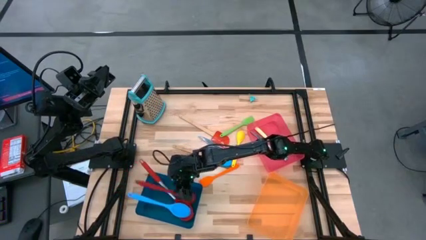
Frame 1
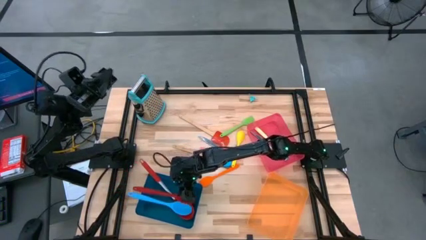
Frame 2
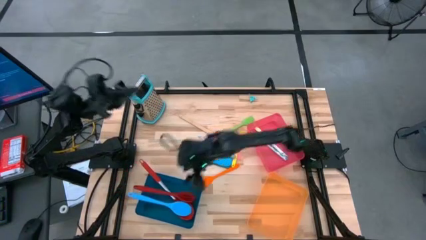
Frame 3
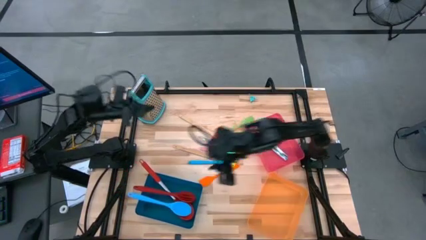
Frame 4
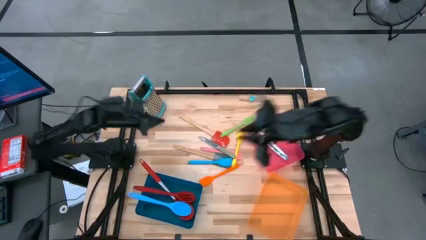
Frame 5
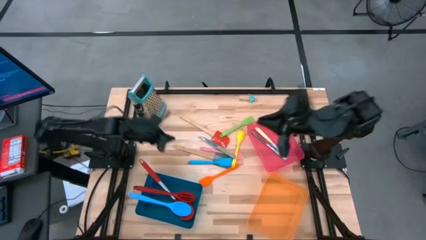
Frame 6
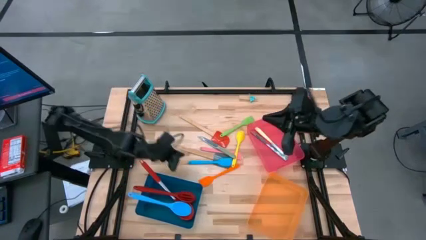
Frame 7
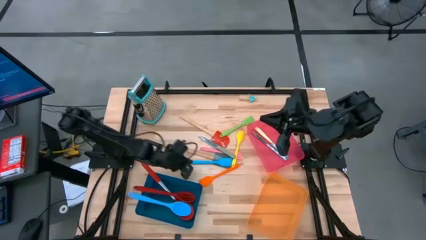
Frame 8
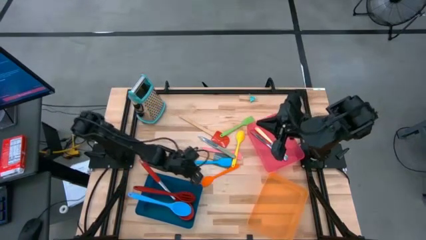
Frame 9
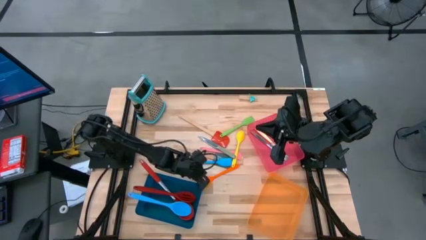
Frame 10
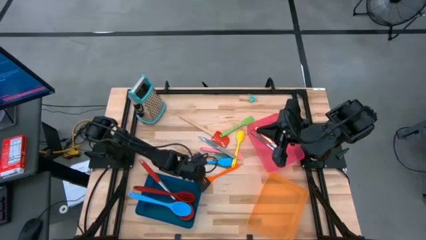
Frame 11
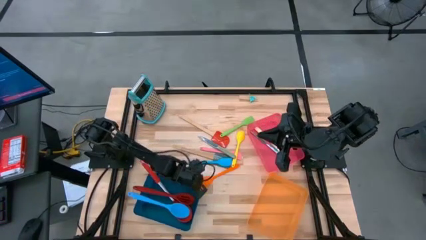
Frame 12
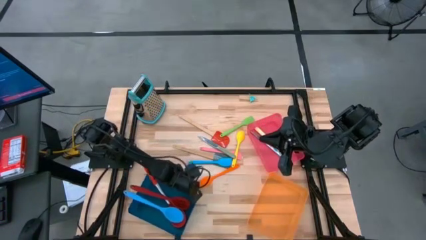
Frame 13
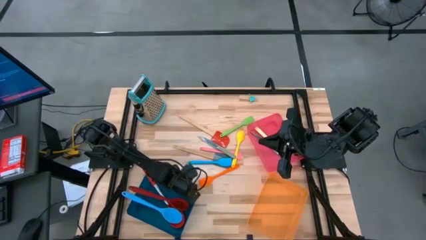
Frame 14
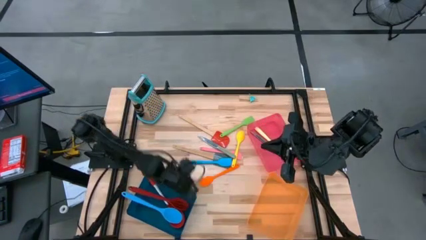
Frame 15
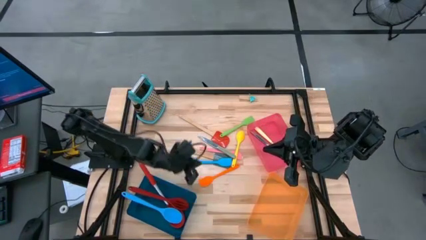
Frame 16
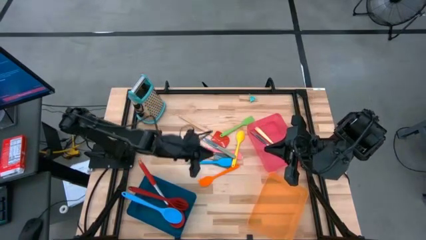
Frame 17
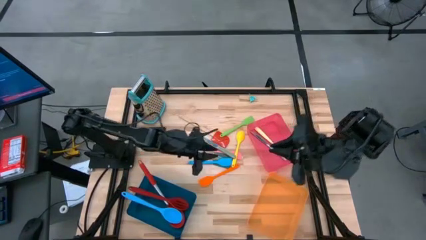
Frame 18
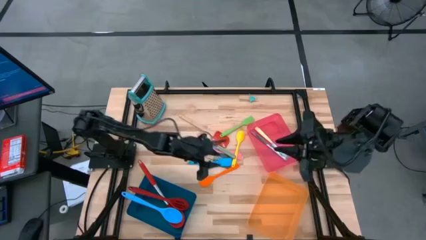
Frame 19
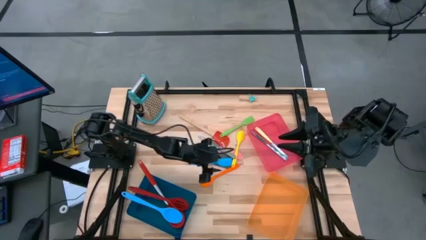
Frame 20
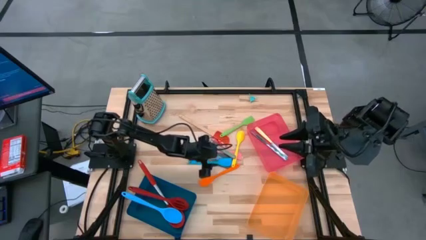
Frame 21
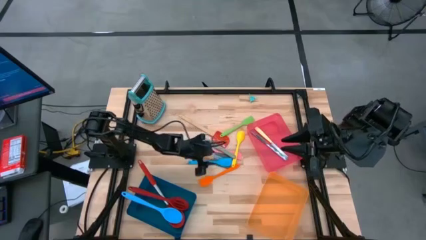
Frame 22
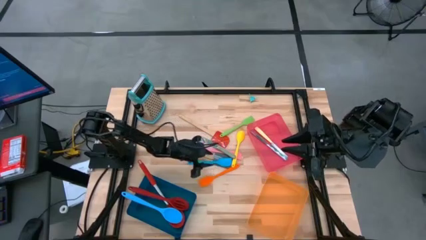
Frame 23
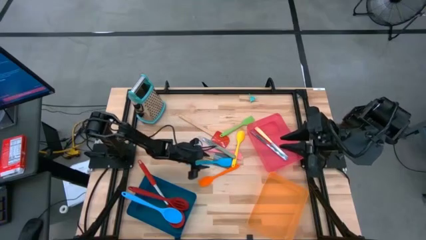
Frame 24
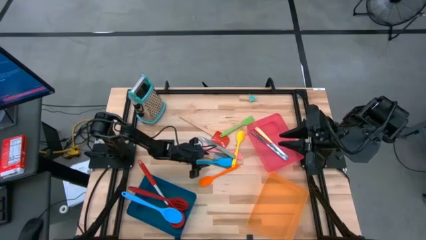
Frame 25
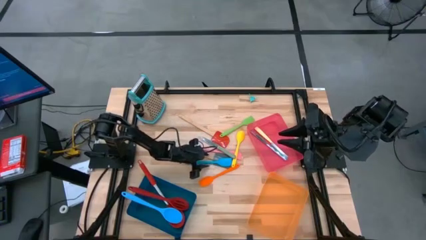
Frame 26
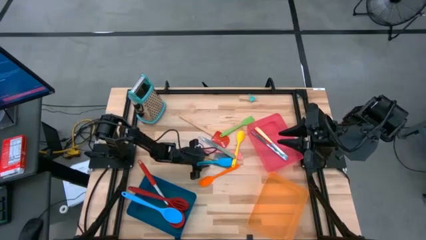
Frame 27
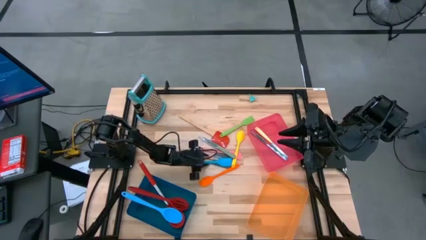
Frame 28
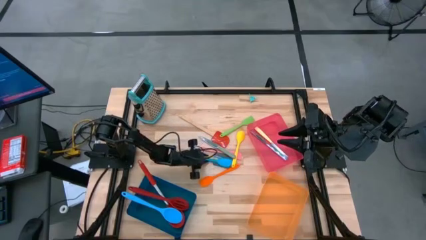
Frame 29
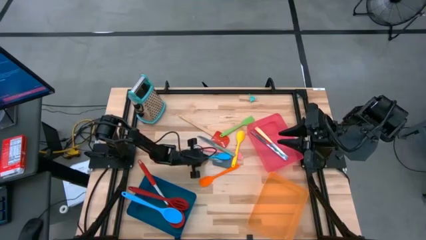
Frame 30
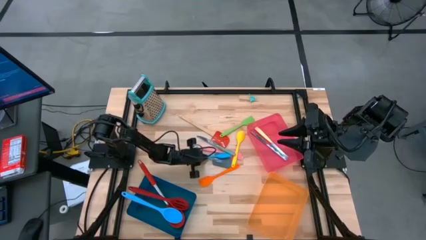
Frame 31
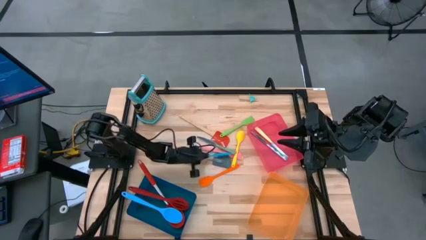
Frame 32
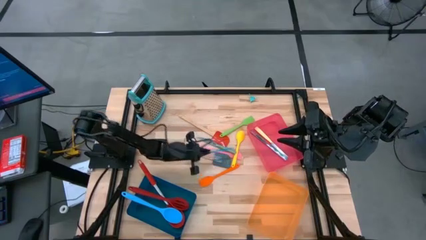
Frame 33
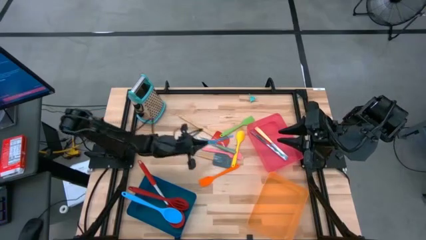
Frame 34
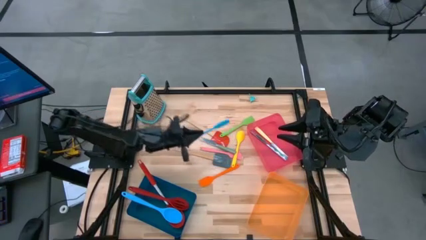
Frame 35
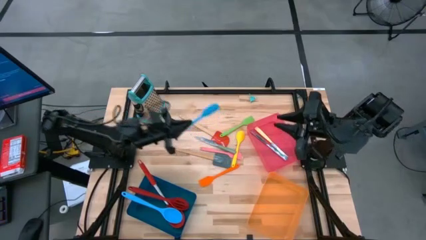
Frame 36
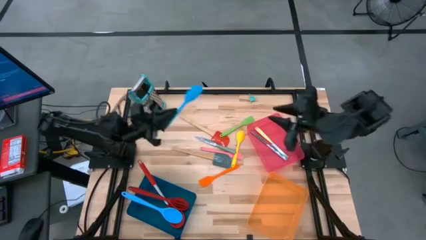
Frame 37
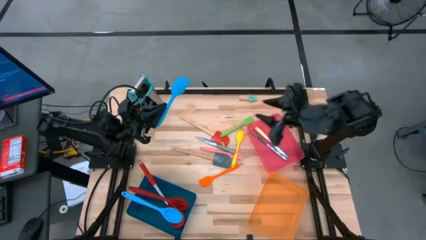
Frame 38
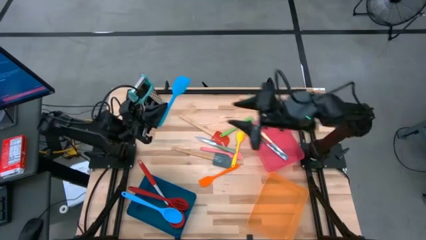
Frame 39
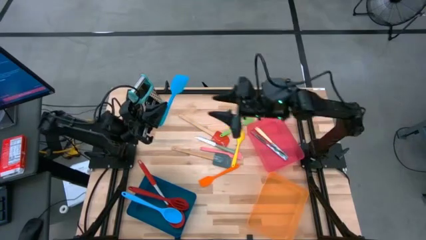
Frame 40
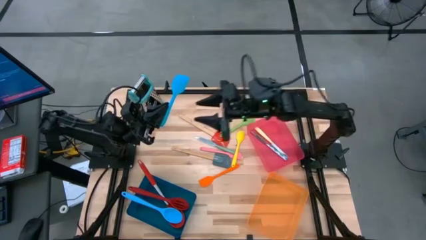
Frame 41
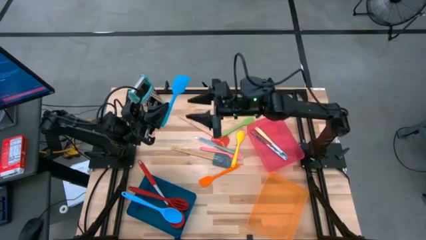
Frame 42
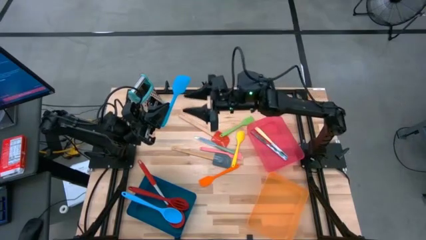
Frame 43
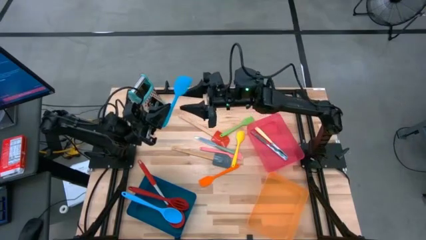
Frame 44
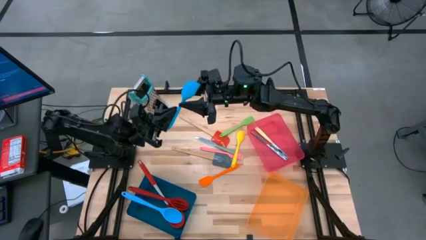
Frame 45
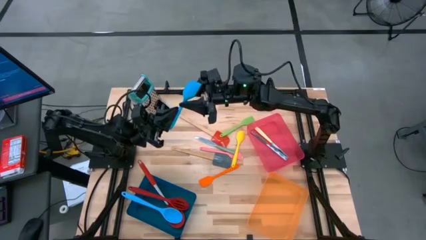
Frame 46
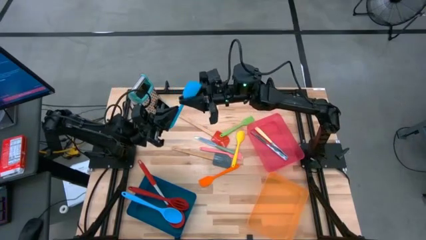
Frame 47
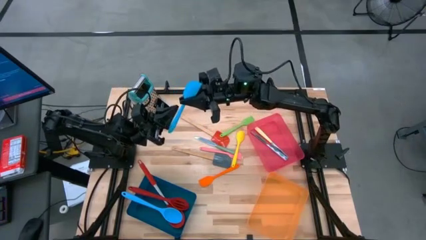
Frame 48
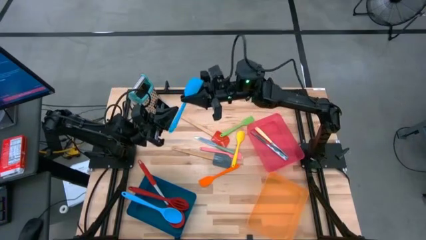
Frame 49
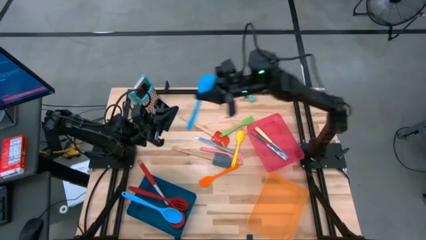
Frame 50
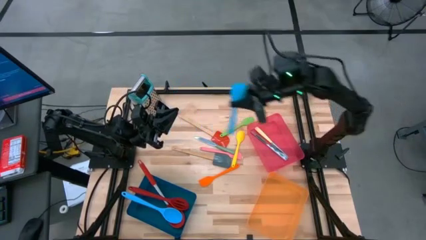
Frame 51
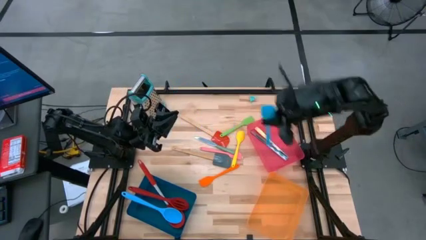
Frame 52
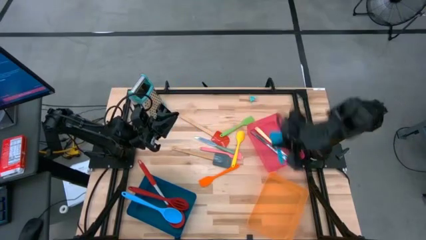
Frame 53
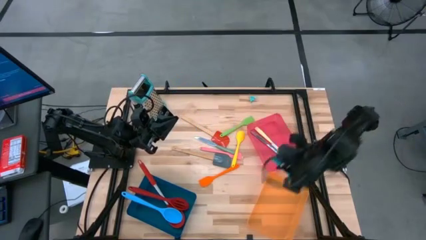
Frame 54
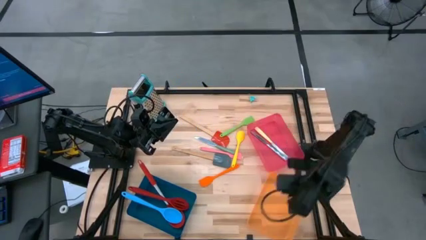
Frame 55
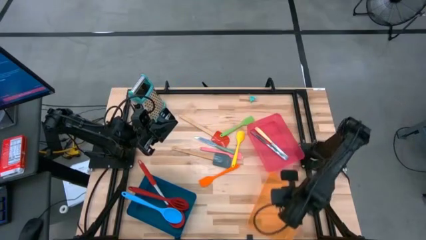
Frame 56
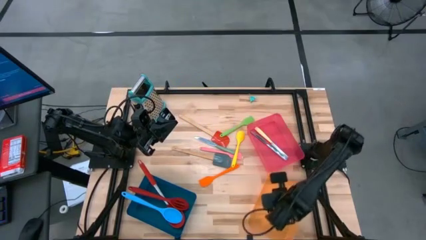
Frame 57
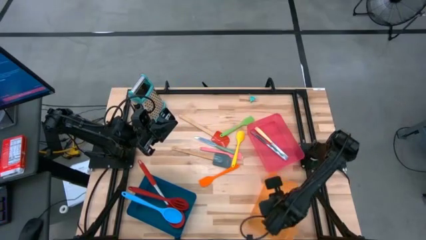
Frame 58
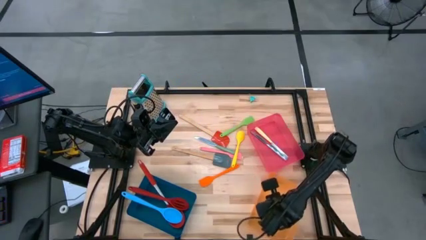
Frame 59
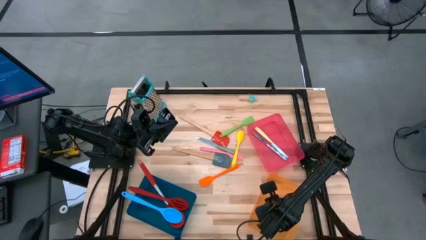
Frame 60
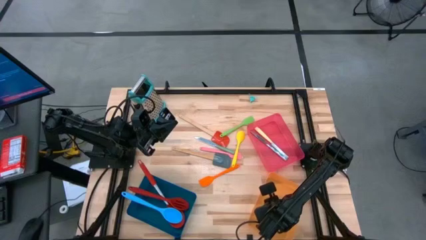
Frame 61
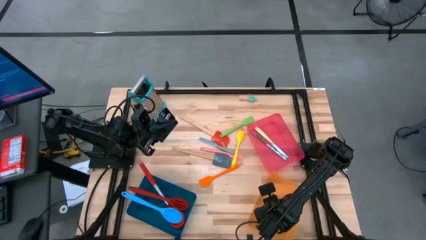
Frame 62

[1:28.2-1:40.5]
Task: Pick & Place Kitchen Items
Put the blue spatula into the orange bin

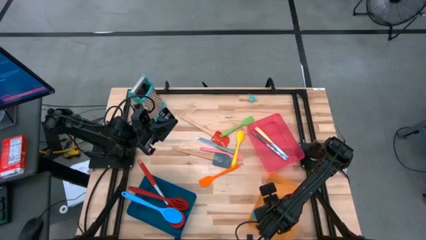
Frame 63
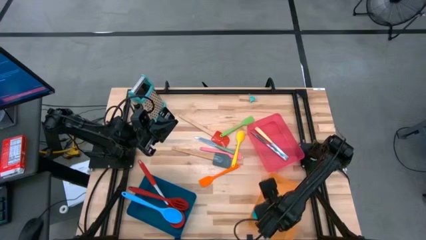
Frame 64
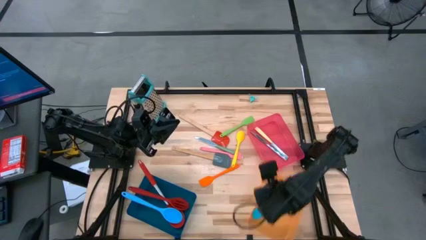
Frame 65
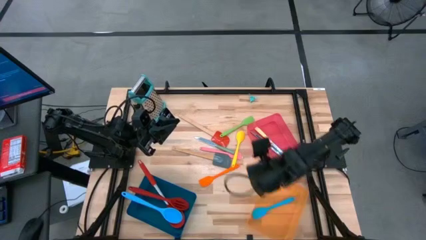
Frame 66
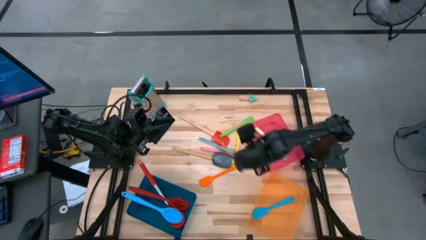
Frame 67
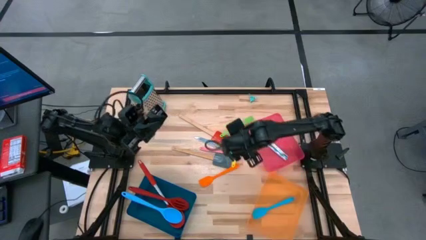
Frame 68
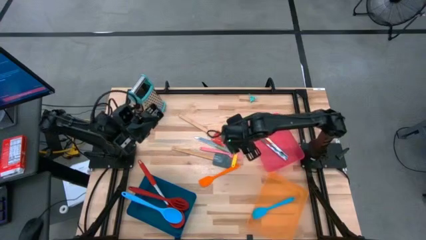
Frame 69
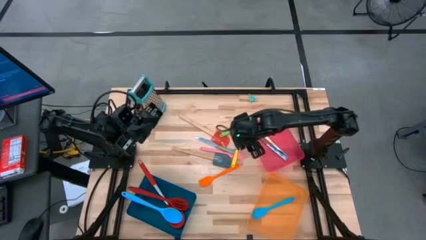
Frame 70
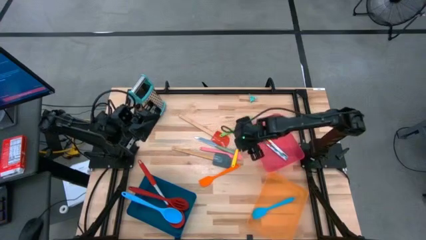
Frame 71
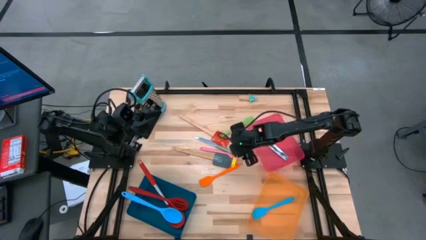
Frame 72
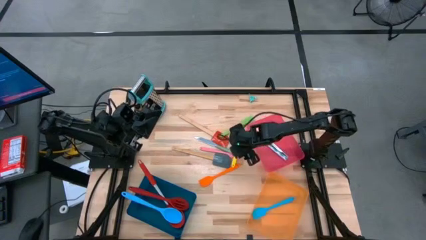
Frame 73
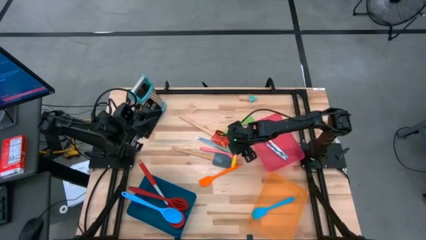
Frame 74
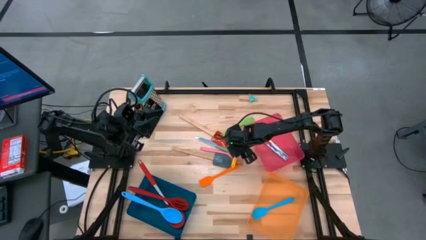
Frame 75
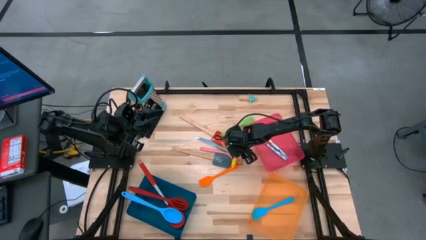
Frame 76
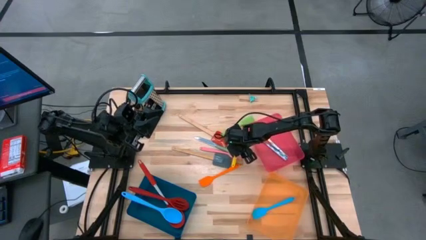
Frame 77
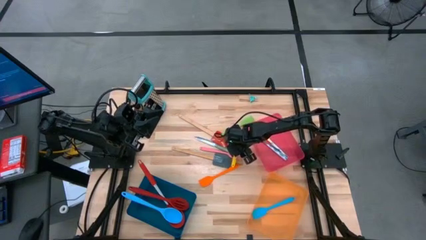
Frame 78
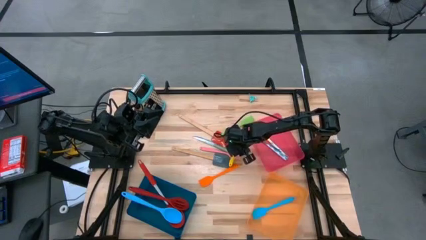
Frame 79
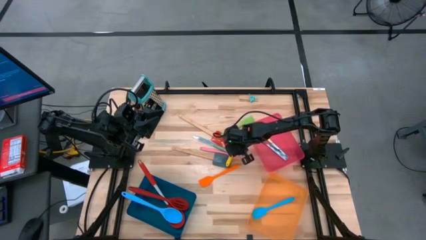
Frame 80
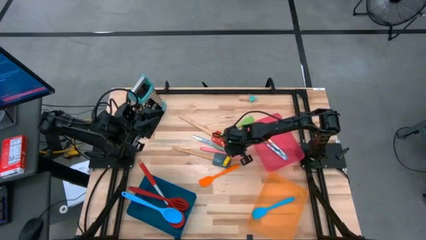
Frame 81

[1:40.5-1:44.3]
Put the yellow serving spoon into the blue bin
